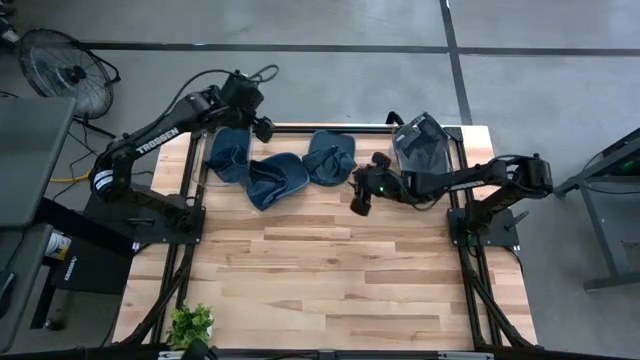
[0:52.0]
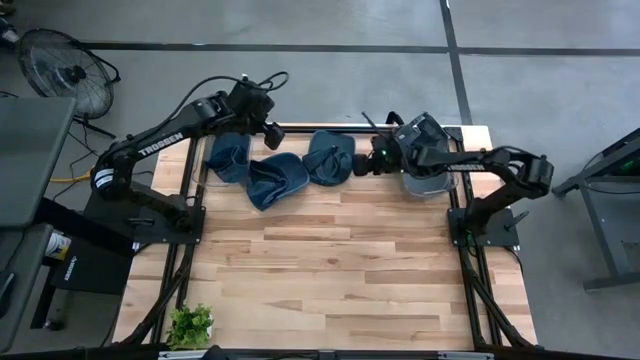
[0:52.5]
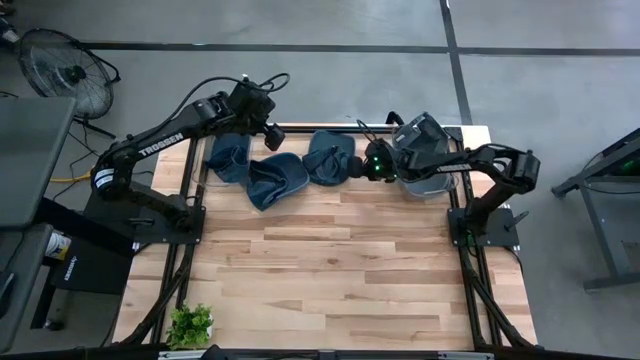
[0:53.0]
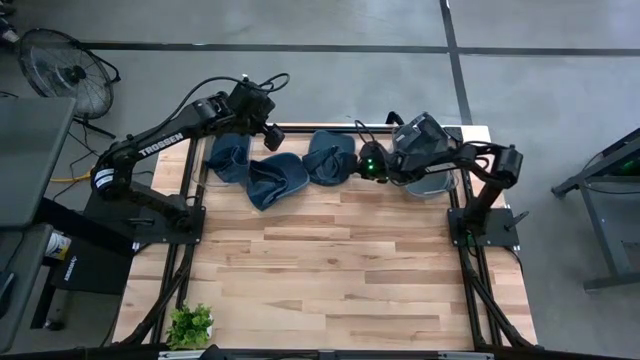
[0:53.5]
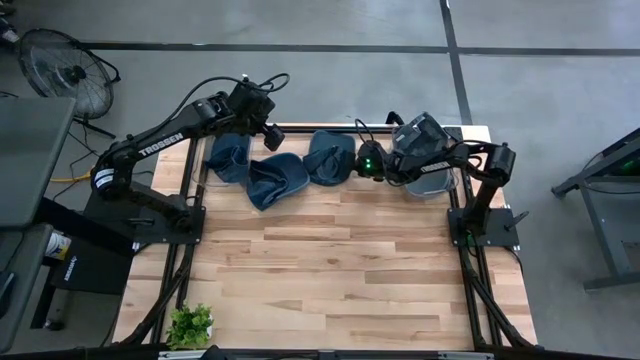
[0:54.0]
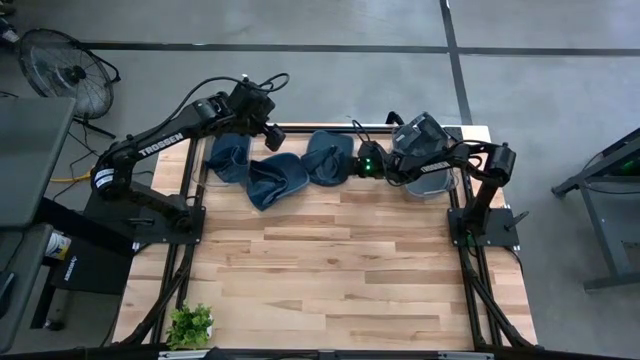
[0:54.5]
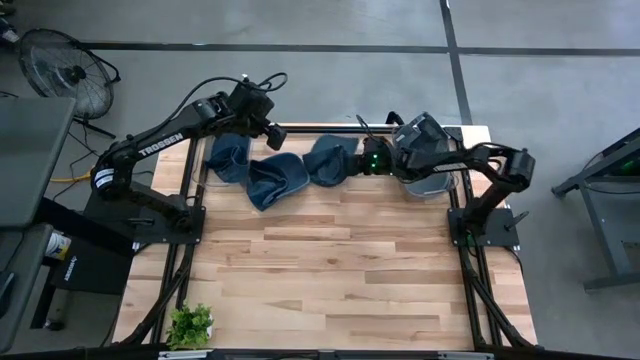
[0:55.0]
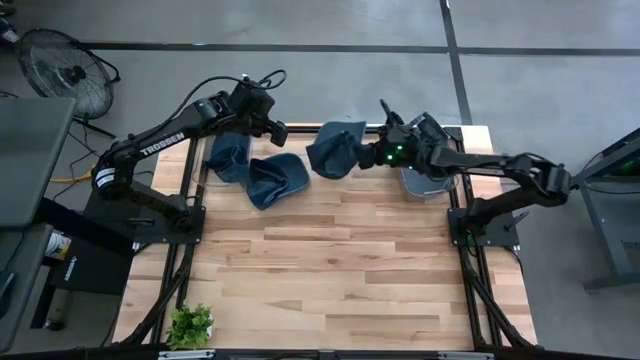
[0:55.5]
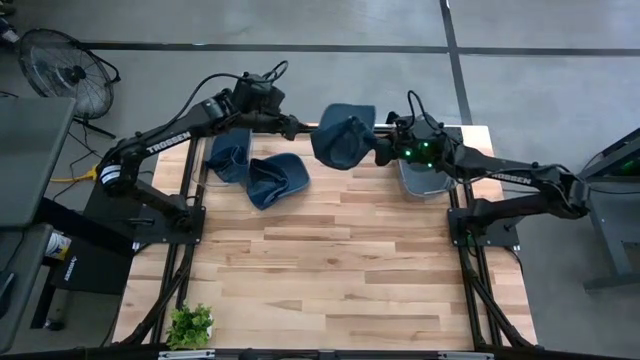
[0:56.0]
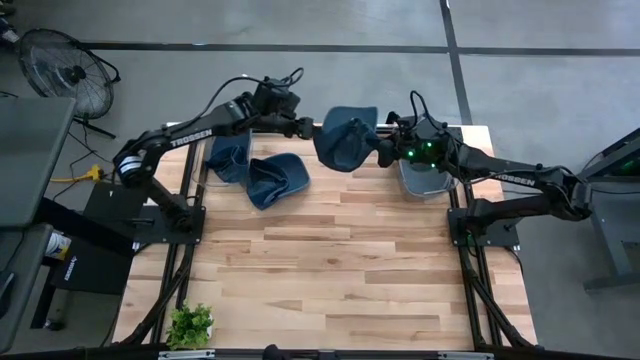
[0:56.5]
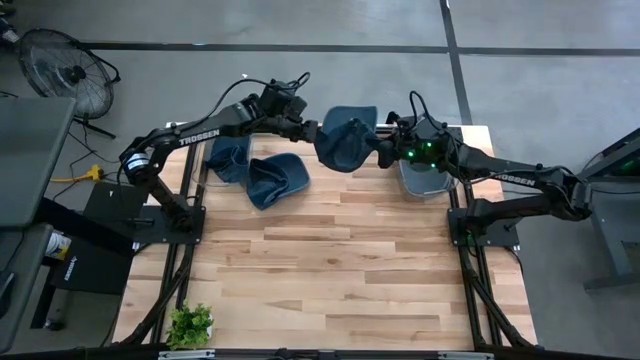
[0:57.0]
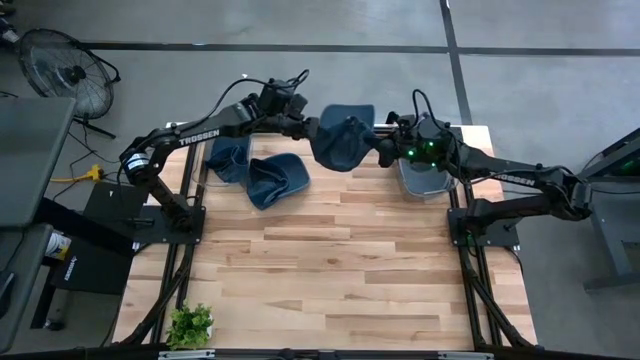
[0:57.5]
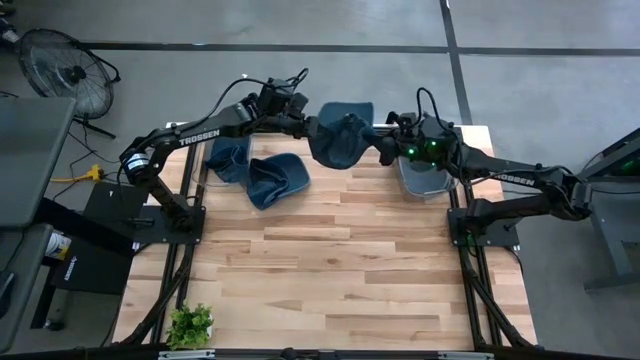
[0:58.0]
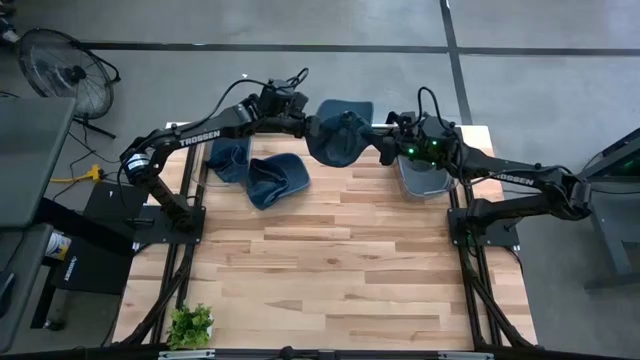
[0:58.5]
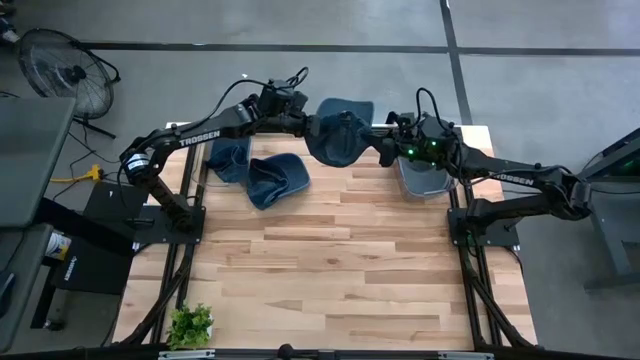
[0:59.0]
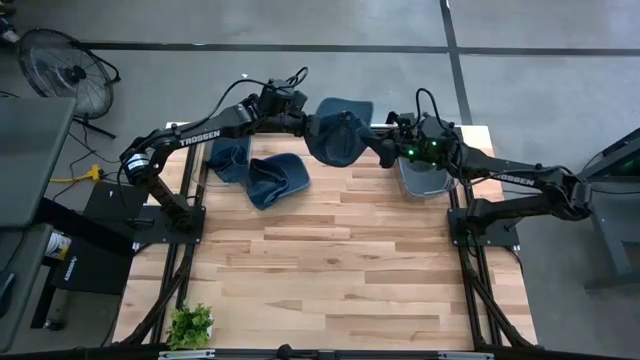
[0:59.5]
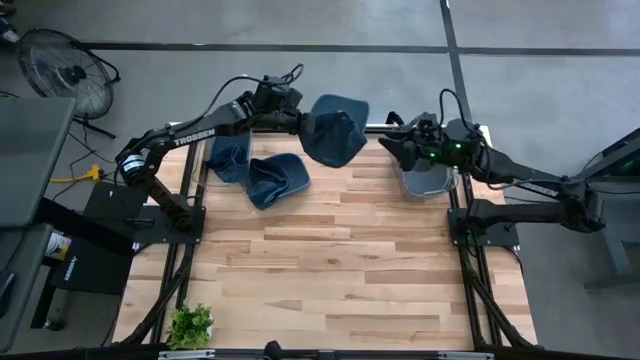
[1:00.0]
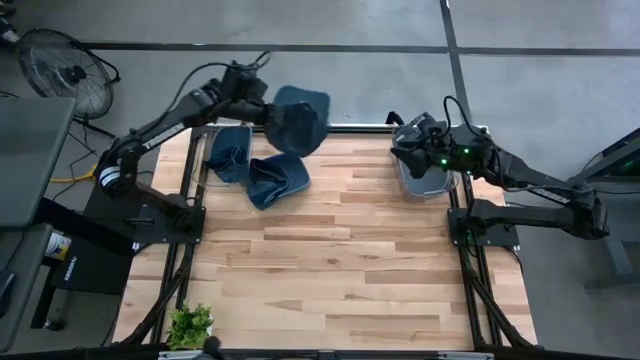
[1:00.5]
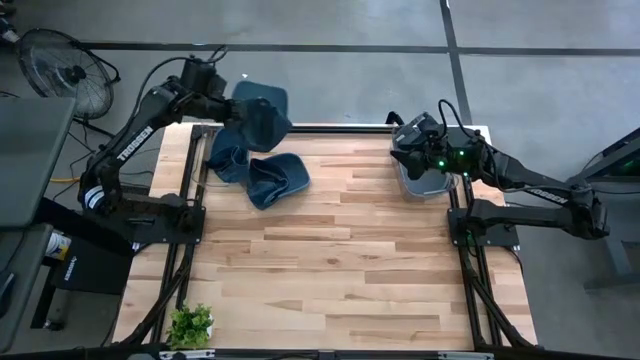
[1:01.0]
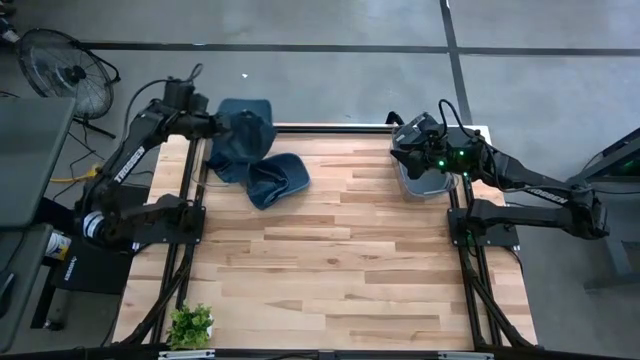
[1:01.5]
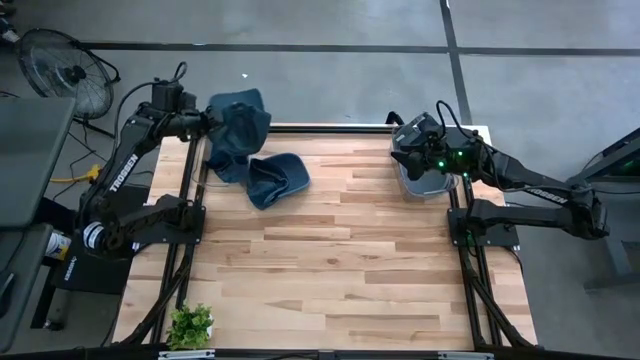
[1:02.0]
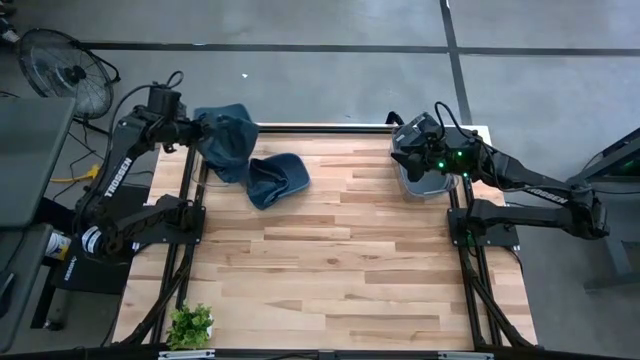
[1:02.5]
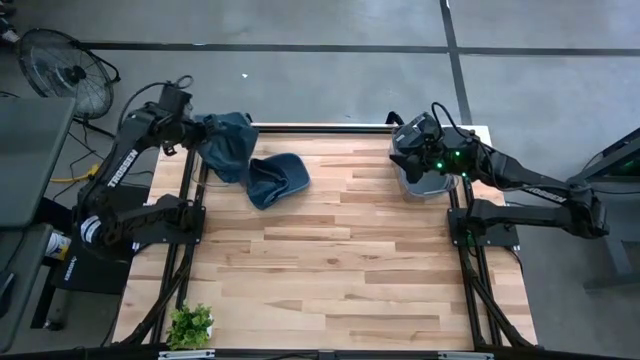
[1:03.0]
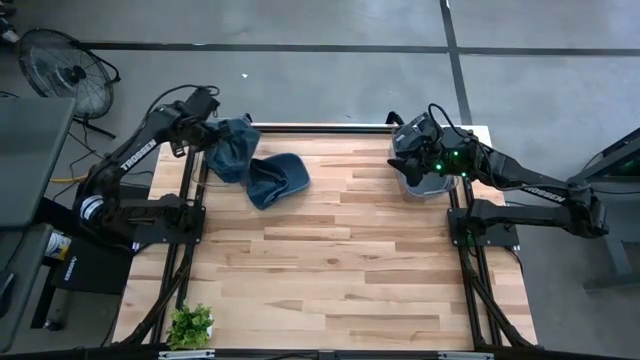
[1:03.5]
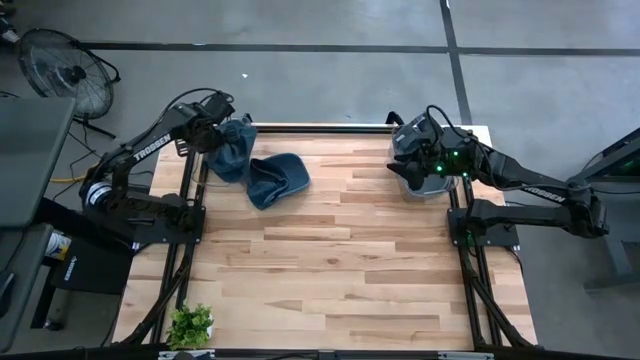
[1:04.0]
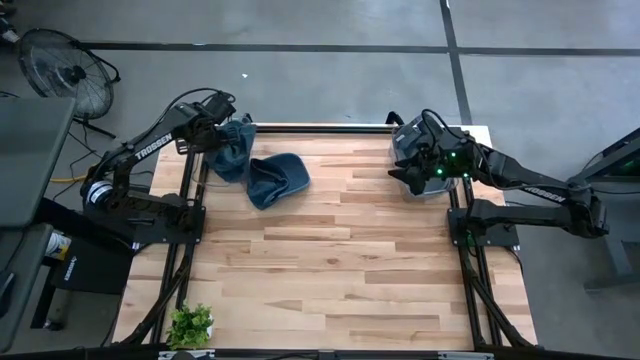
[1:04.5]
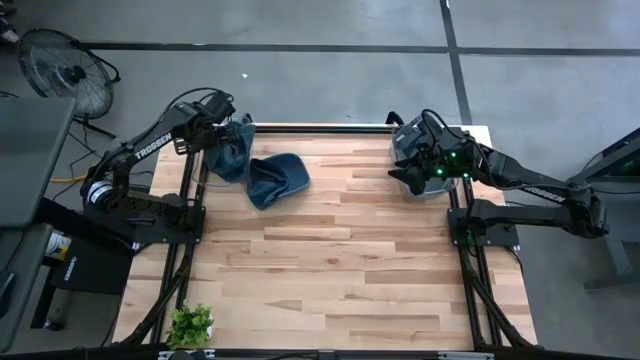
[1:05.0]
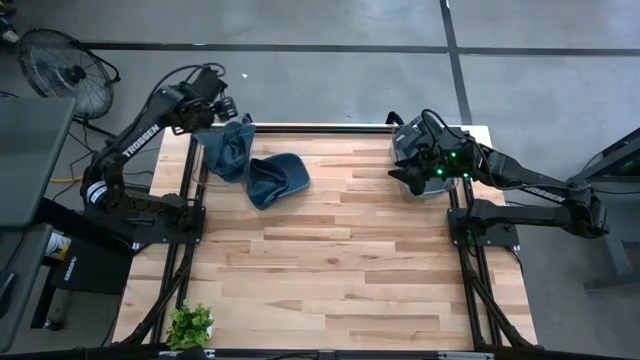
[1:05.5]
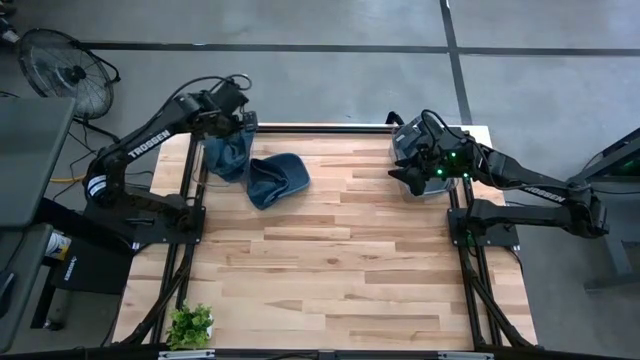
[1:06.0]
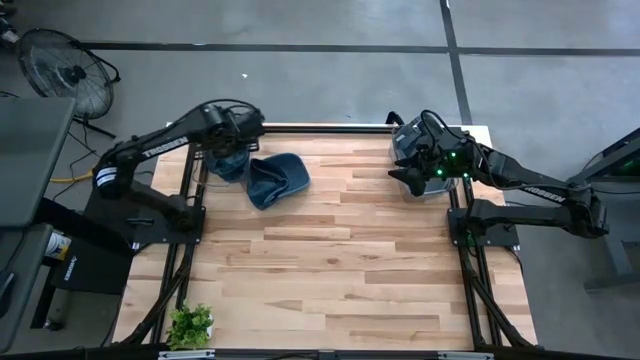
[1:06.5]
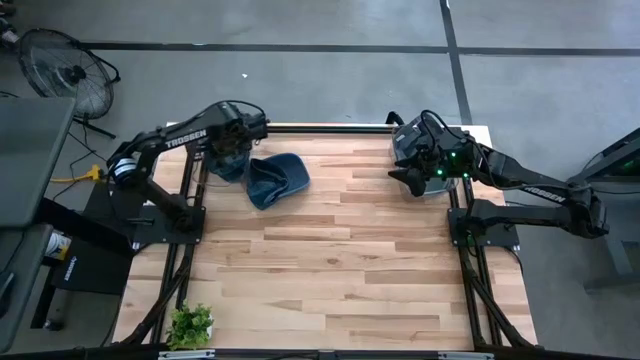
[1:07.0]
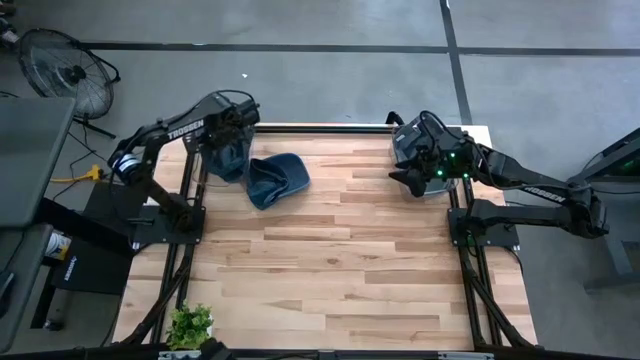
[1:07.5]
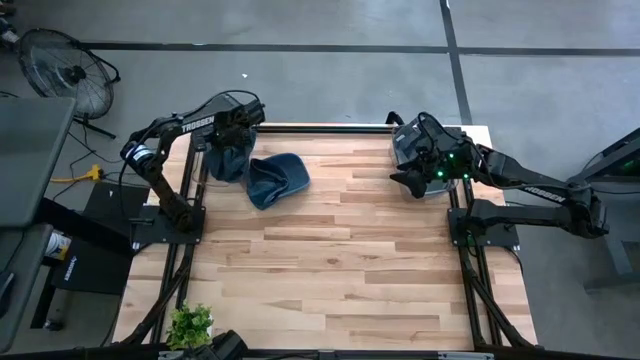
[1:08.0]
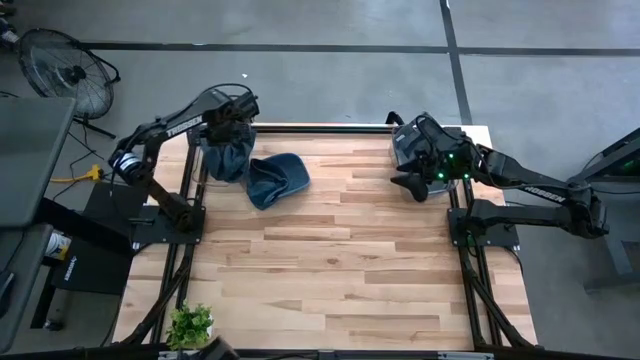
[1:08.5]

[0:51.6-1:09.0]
Task: Pick & Place hat
Put the right blue cap into the left transparent bin

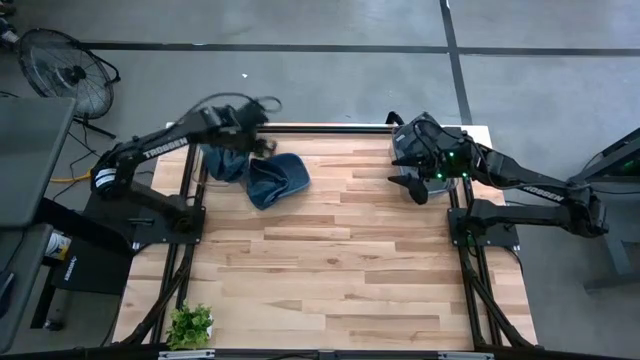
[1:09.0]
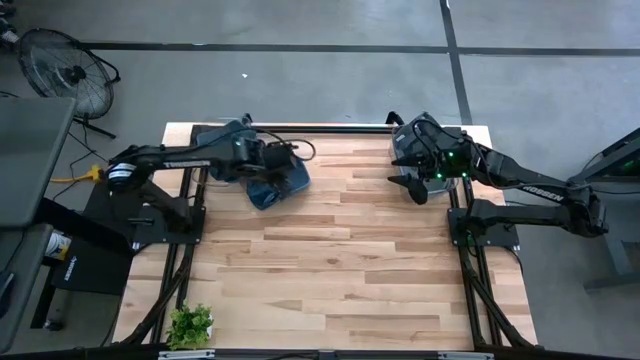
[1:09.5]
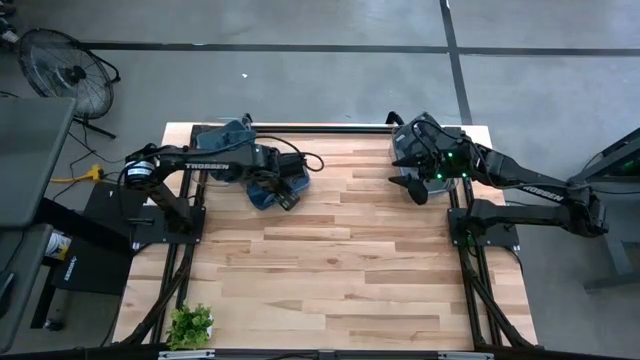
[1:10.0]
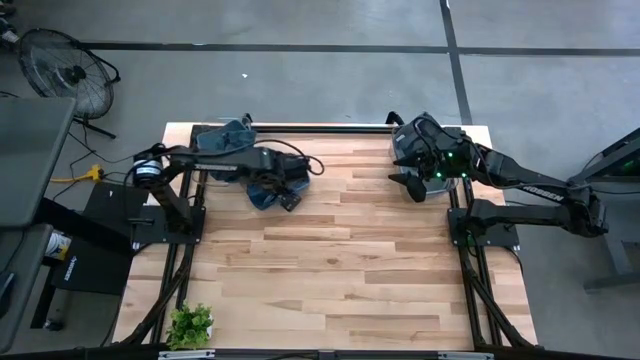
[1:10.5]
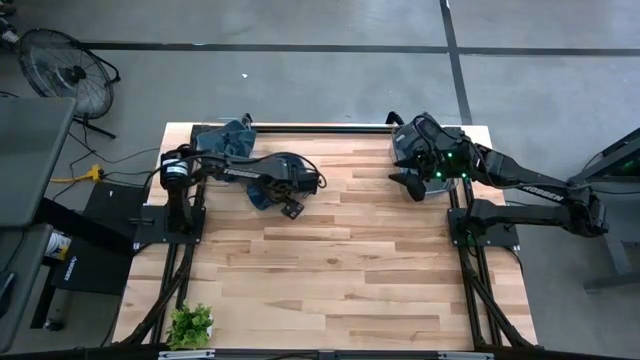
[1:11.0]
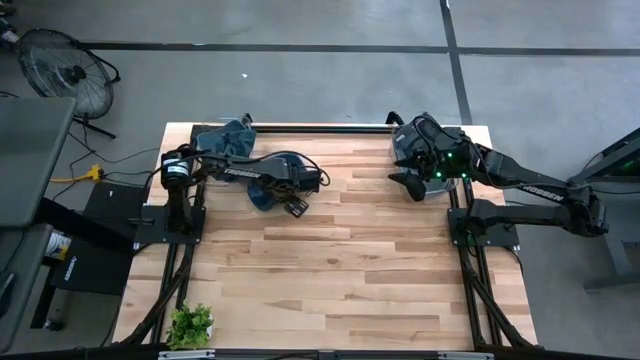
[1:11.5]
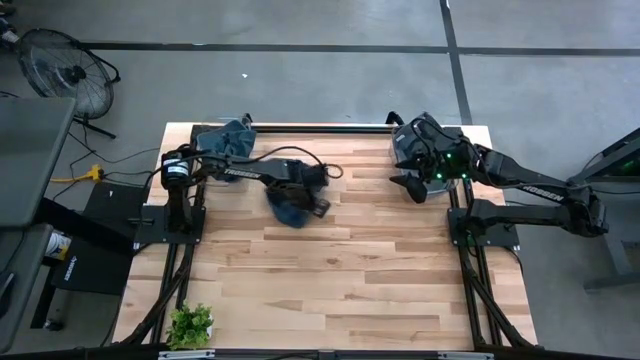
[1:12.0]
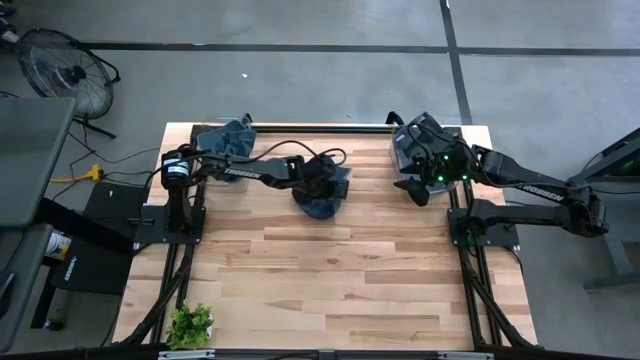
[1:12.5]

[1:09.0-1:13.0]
Put the blue cap into the left transparent bin
